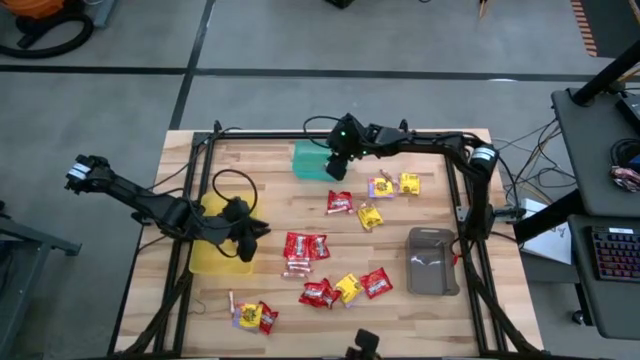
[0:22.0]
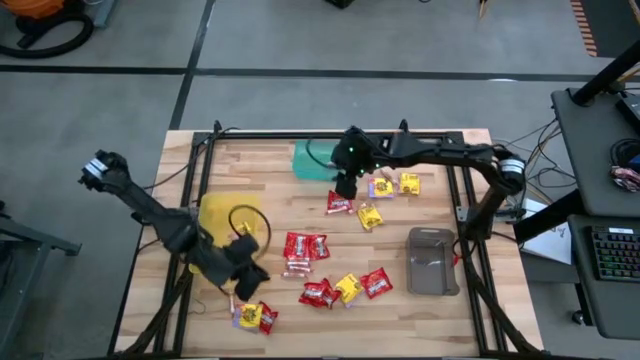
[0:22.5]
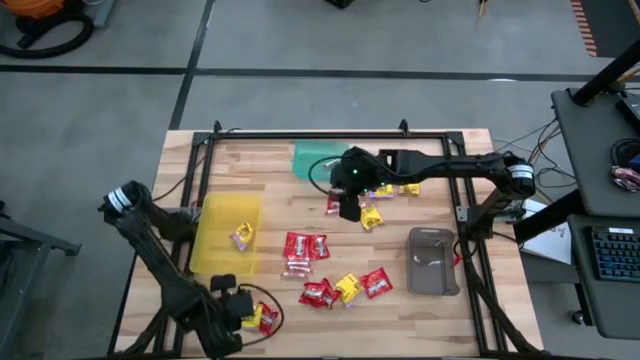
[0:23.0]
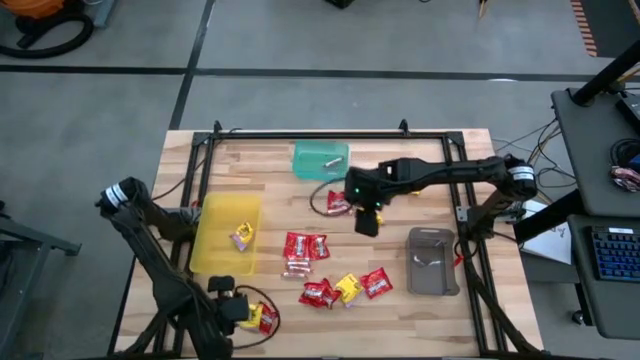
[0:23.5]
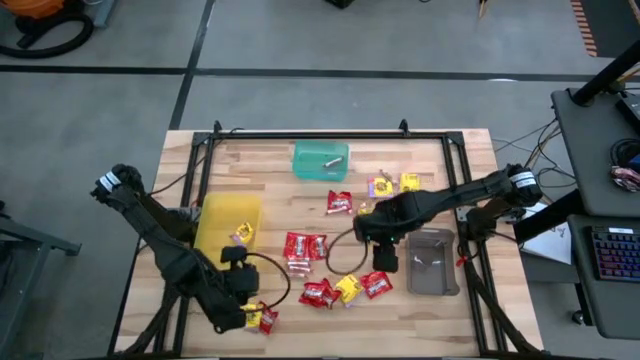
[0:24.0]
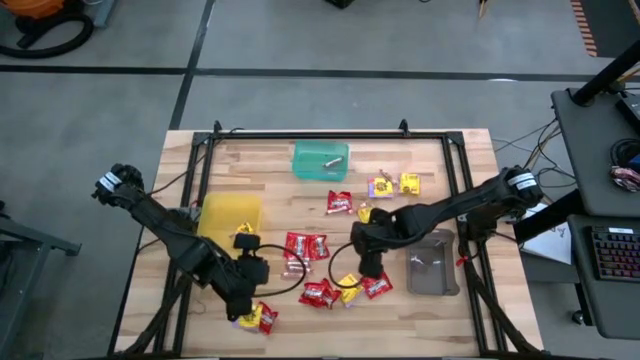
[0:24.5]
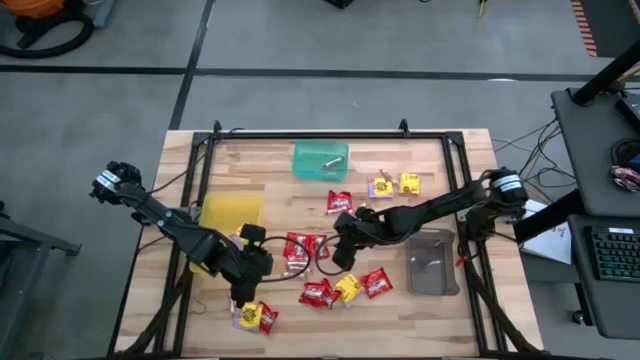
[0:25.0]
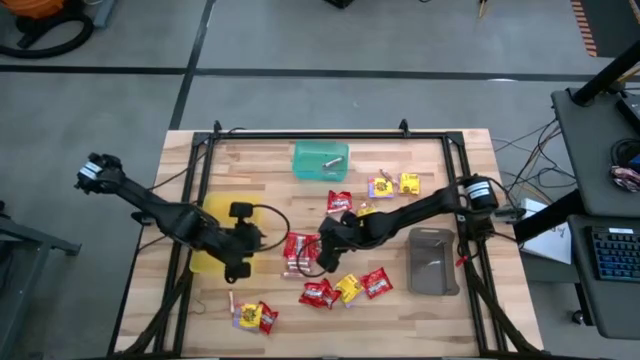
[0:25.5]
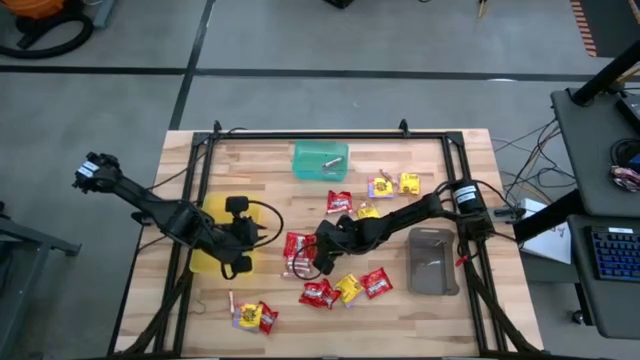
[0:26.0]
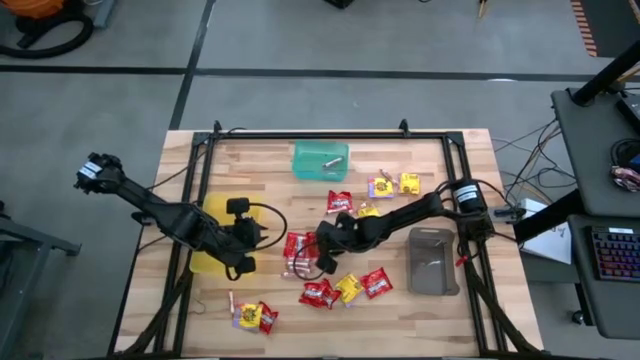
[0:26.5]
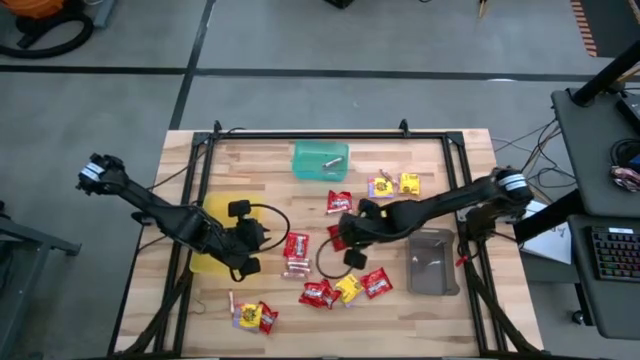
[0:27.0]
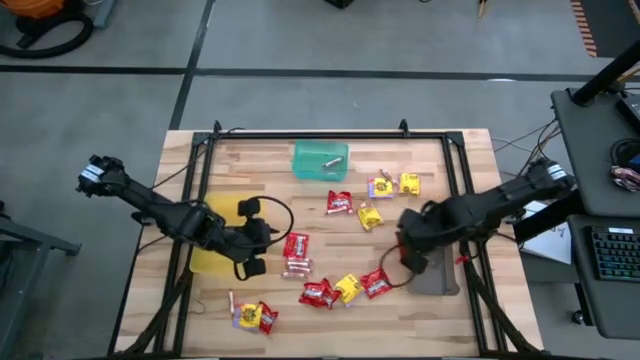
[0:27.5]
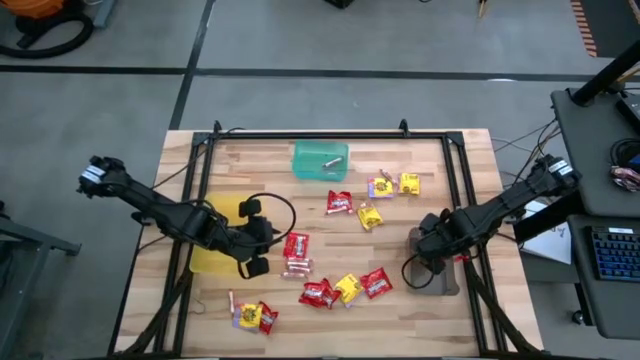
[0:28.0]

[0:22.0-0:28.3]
Task: Sort candy
Put the red candy into the black bin

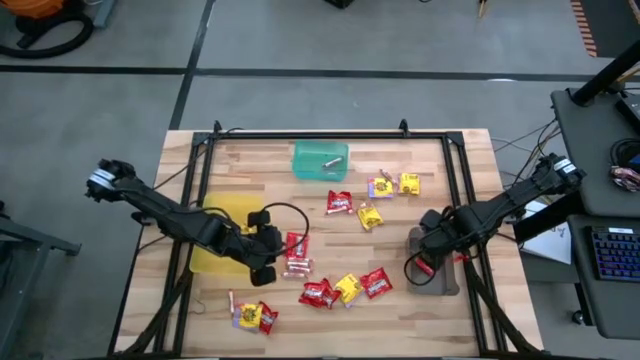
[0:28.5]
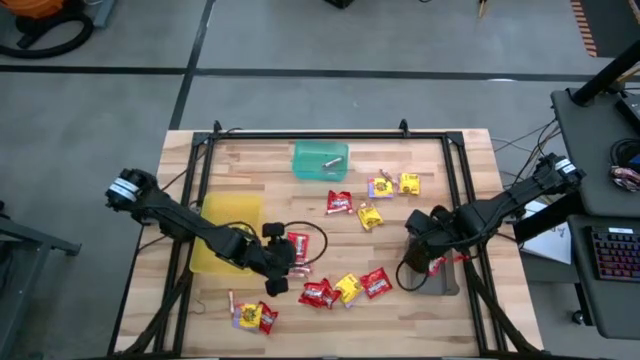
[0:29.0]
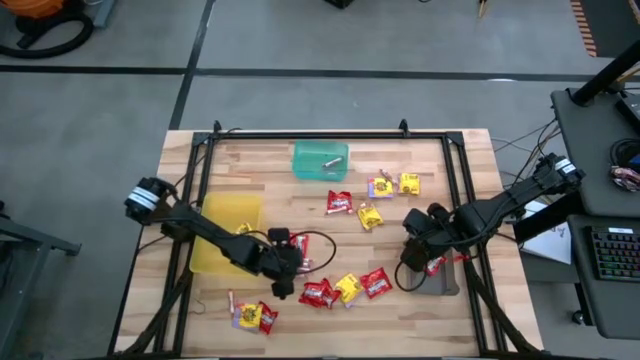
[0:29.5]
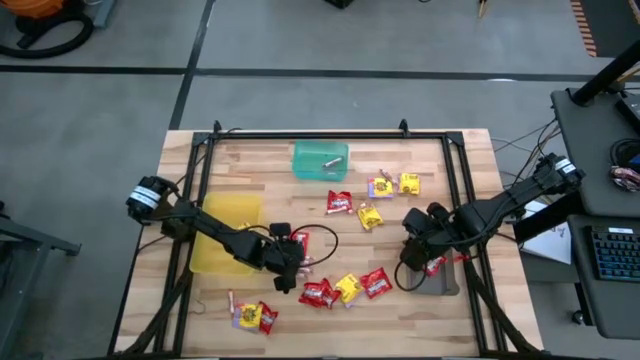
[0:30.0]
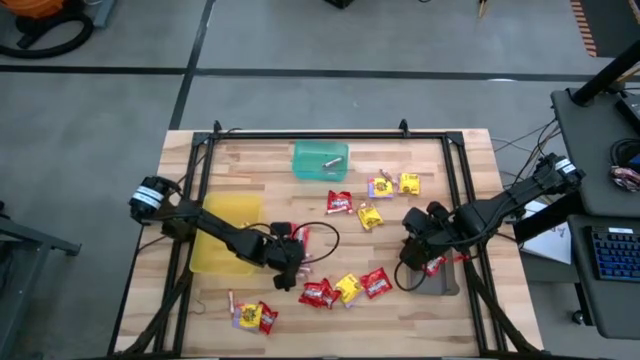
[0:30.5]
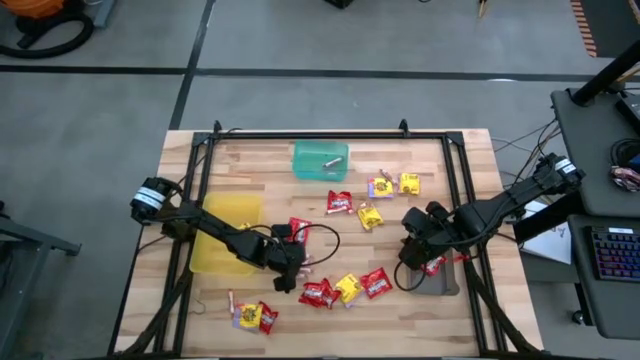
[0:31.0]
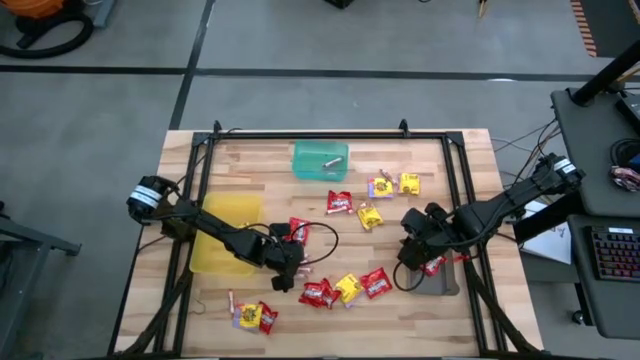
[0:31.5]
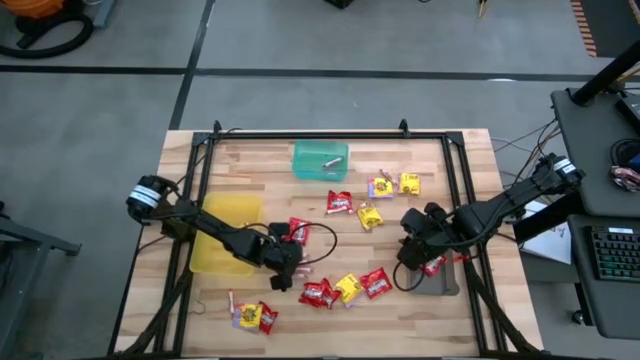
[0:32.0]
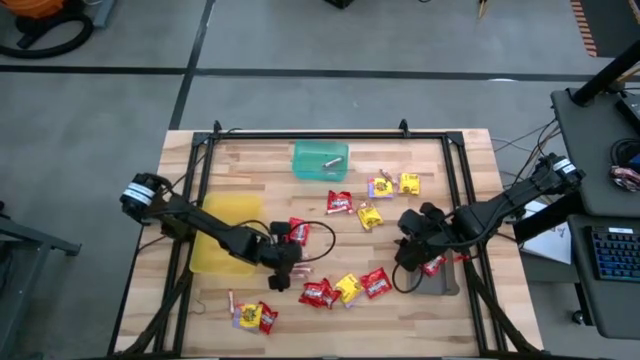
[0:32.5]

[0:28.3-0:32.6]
Put the white candy into the green bin

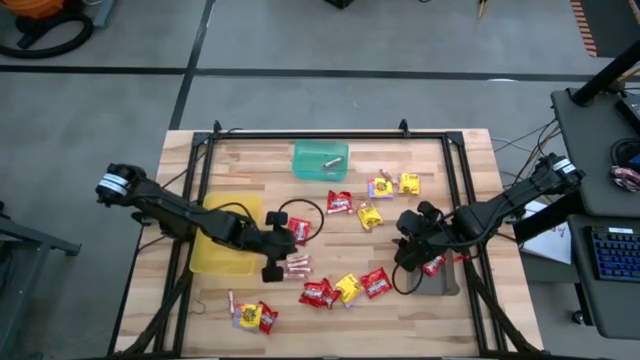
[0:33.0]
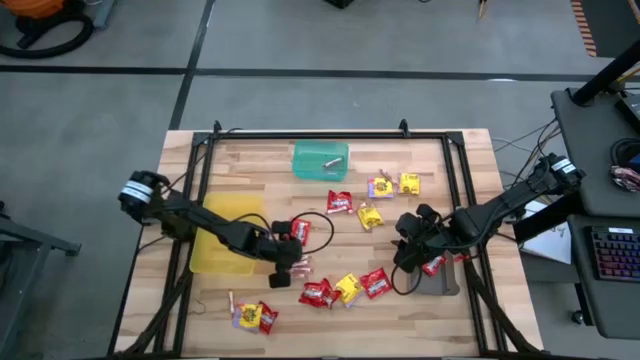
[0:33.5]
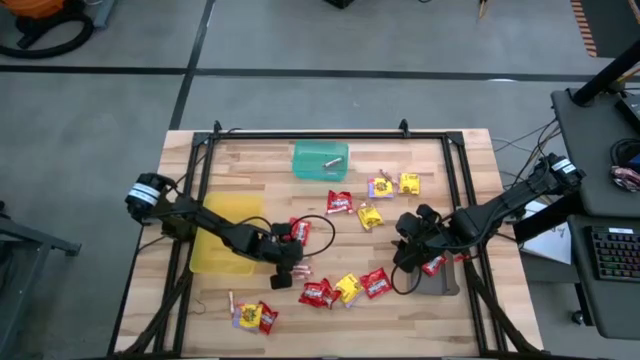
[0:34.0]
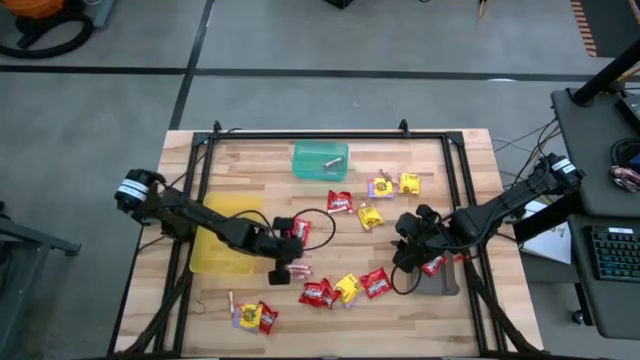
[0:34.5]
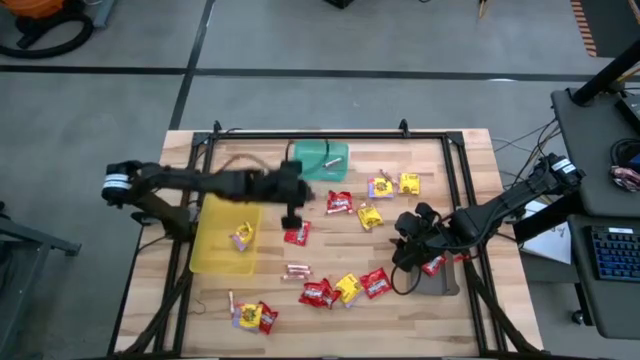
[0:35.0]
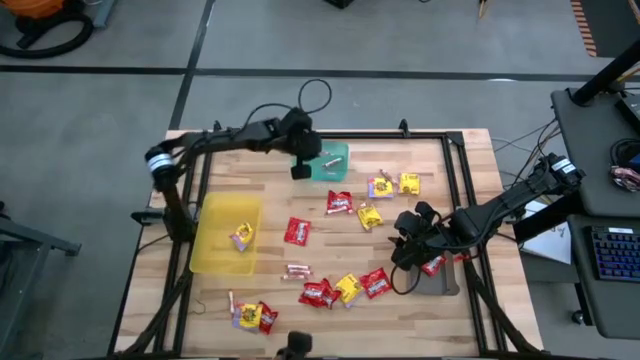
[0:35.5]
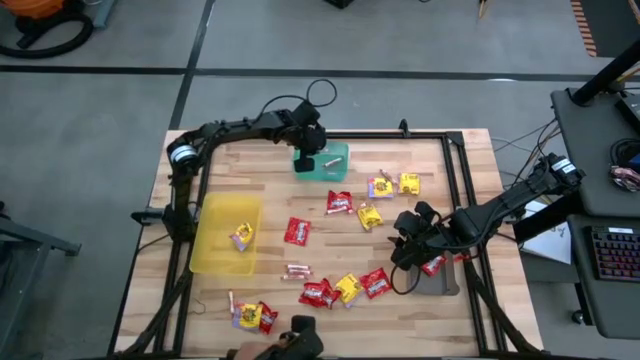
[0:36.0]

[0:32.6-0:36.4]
Put the white candy into the green bin

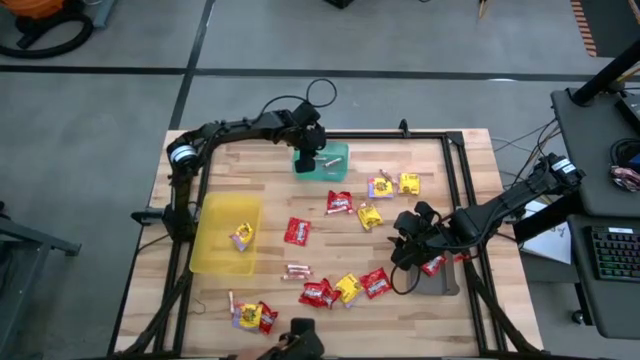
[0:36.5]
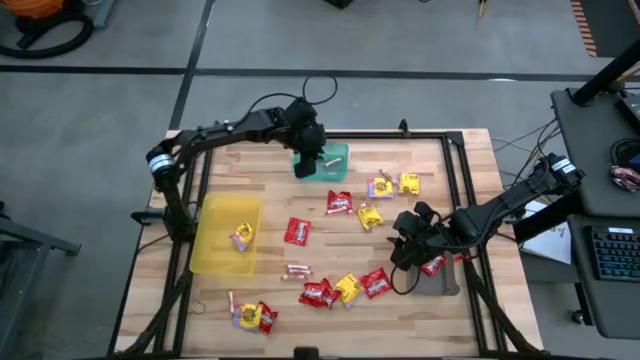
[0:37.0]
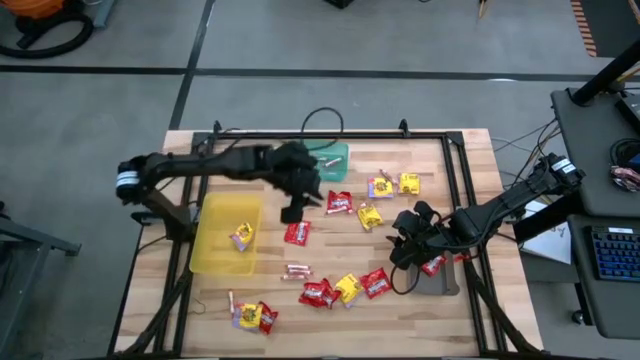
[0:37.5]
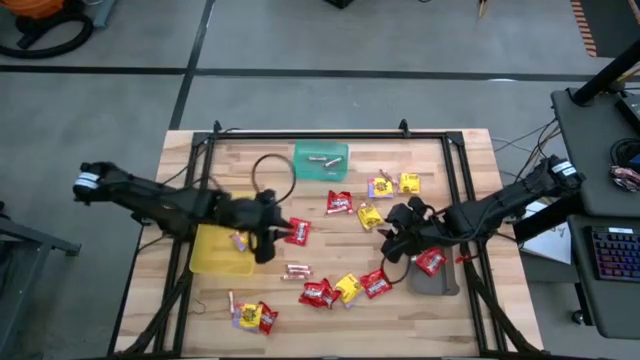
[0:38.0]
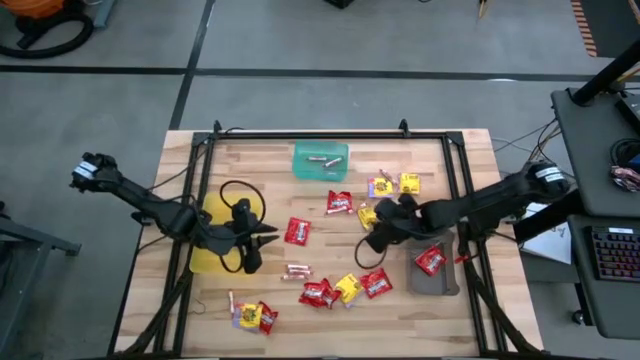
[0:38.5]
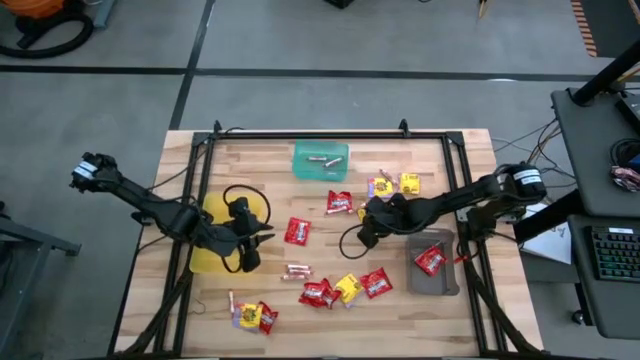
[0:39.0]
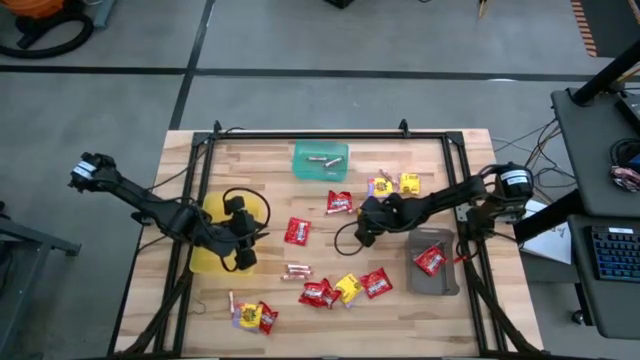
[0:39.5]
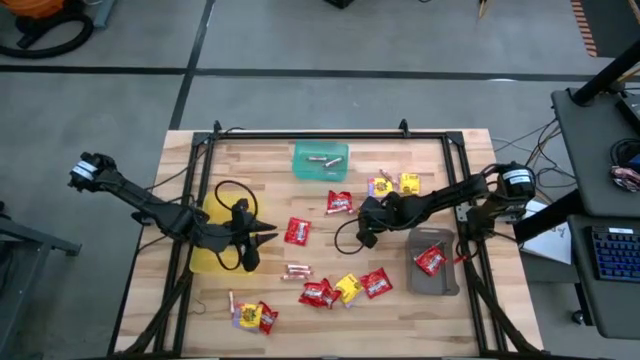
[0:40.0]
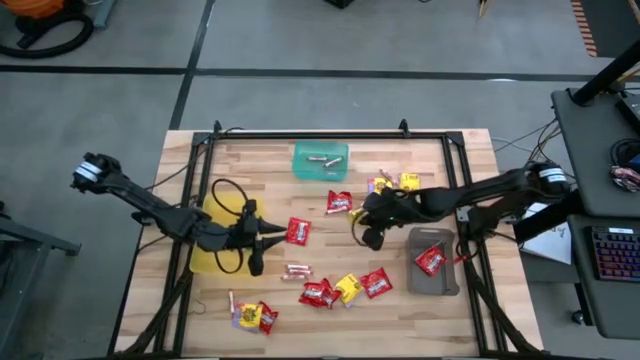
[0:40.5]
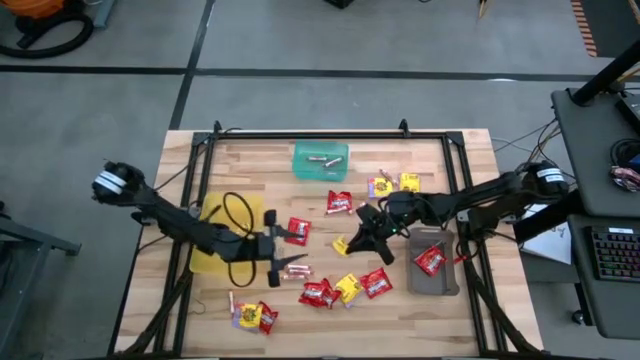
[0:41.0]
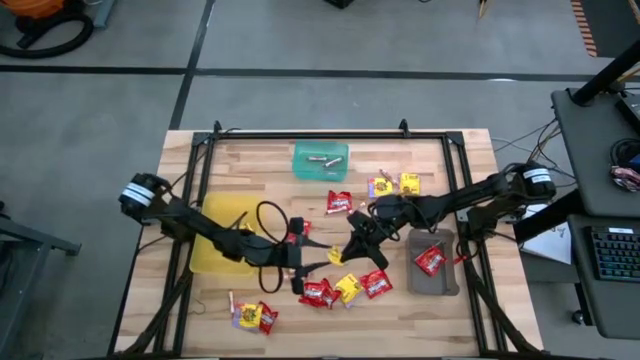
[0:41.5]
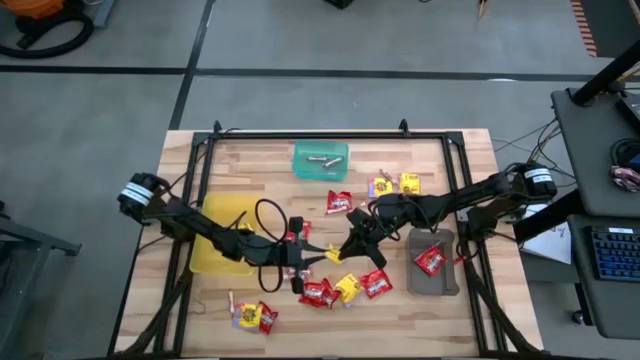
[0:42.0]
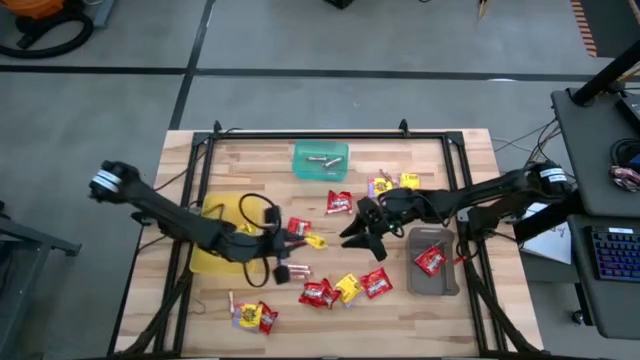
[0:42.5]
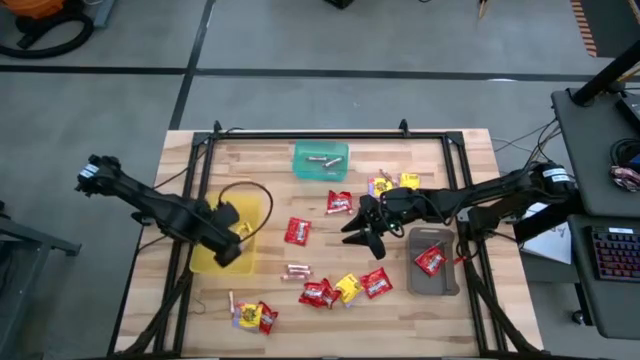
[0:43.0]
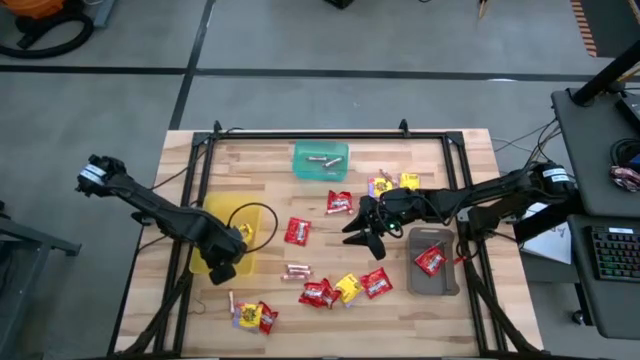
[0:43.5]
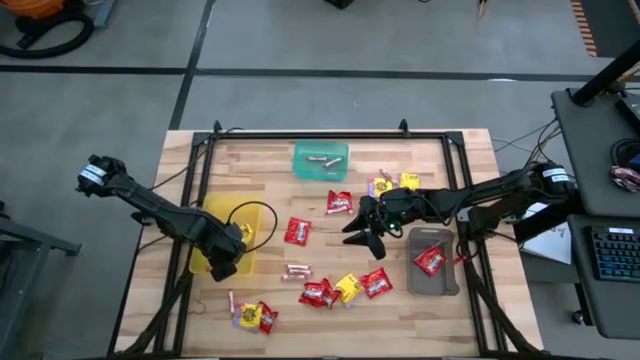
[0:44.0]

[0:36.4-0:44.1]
Put the yellow candy into the yellow bin
